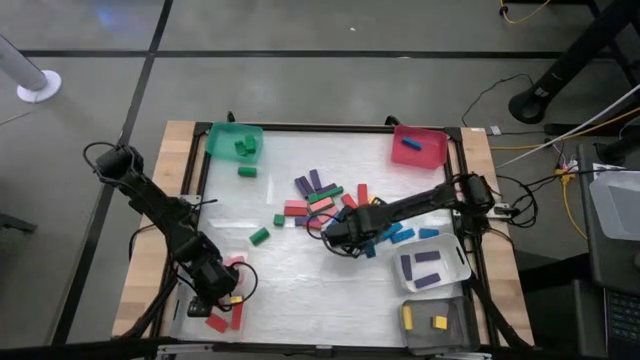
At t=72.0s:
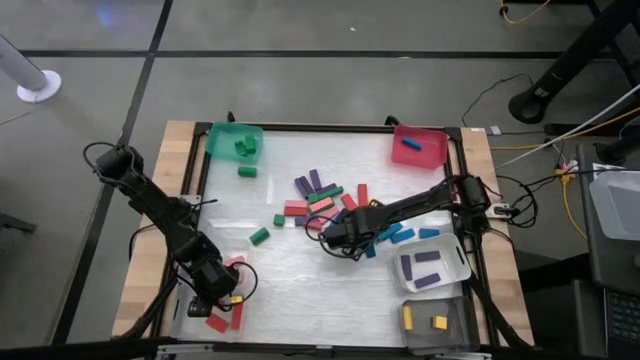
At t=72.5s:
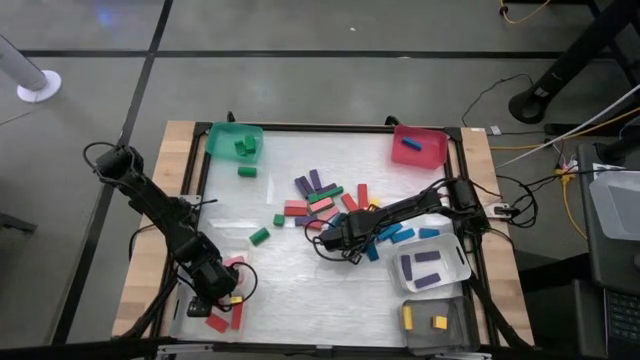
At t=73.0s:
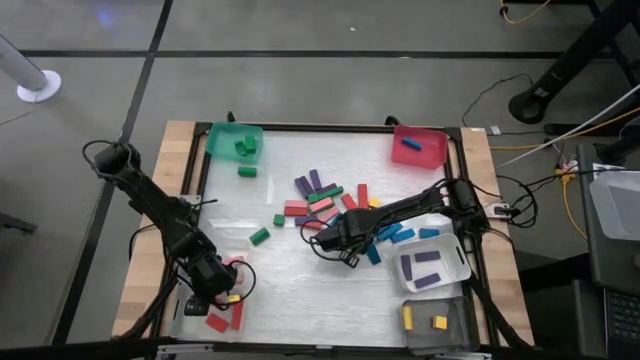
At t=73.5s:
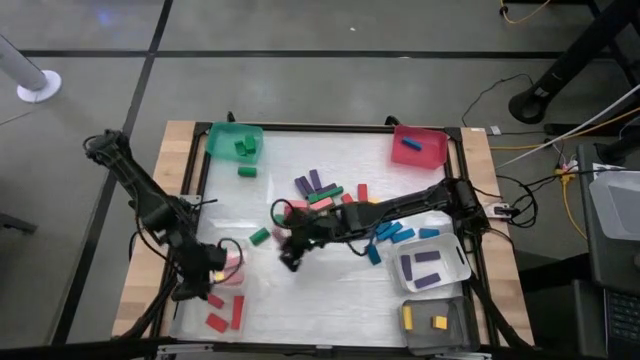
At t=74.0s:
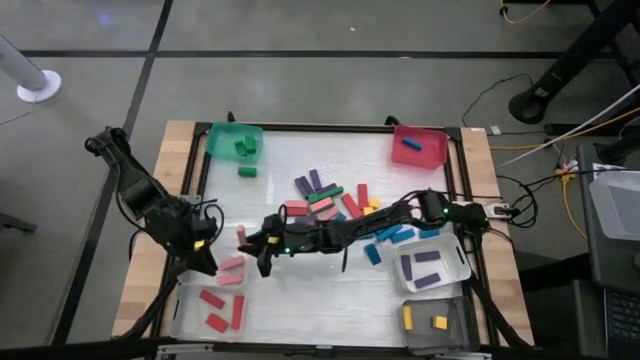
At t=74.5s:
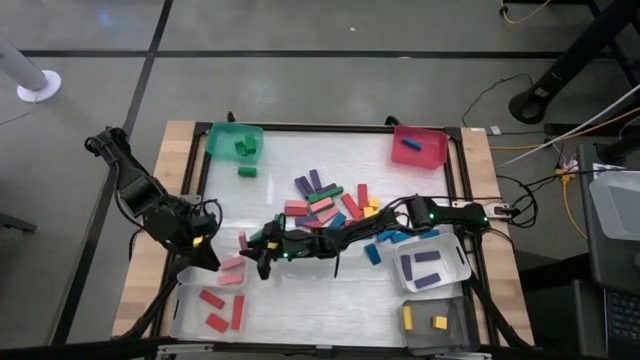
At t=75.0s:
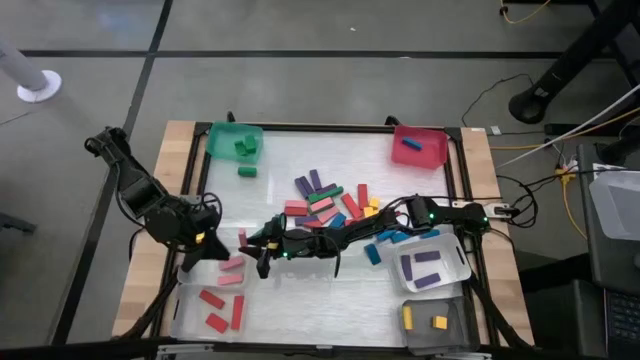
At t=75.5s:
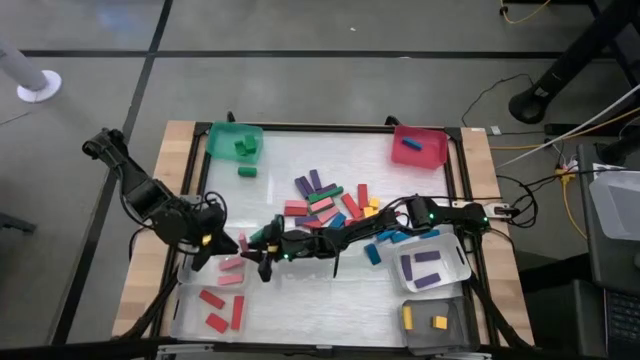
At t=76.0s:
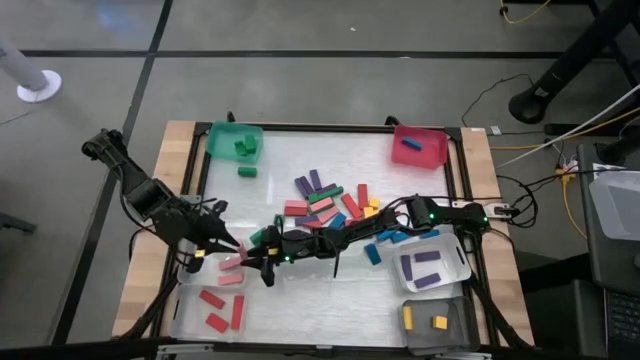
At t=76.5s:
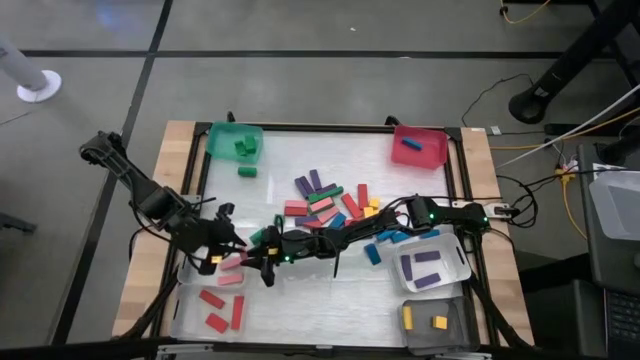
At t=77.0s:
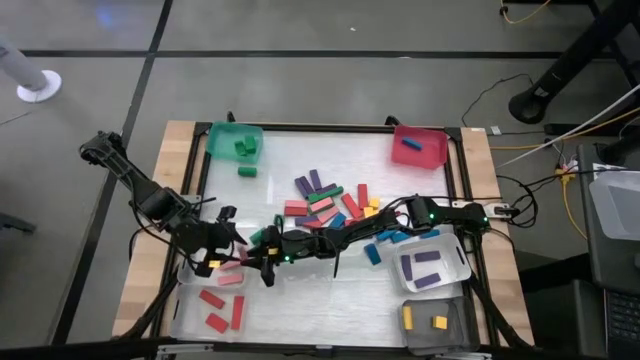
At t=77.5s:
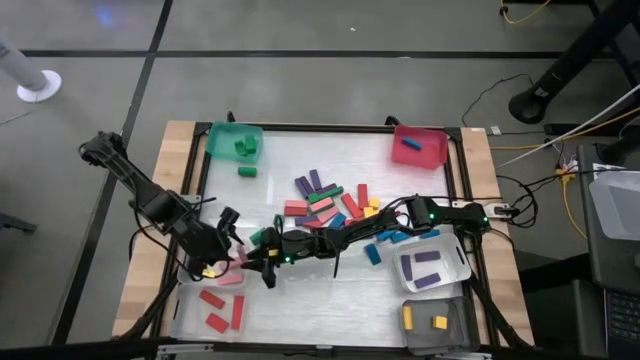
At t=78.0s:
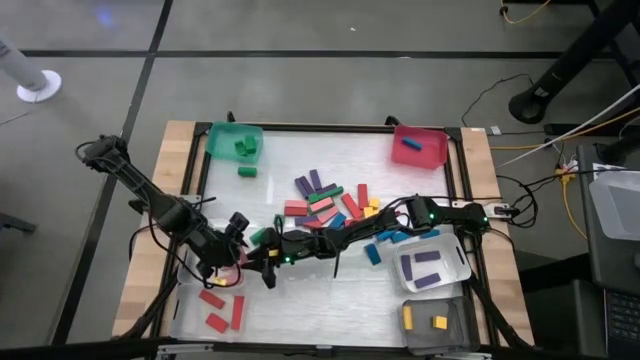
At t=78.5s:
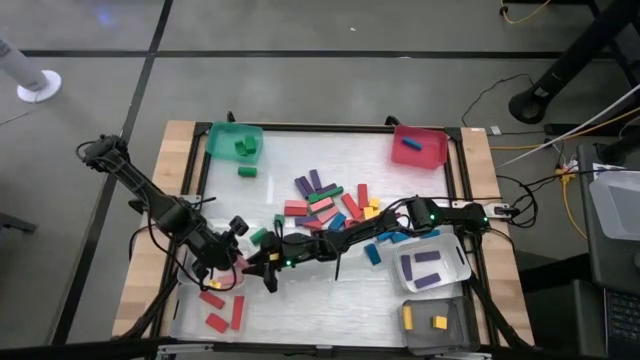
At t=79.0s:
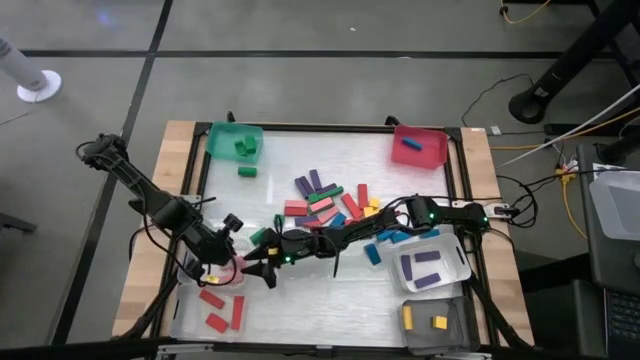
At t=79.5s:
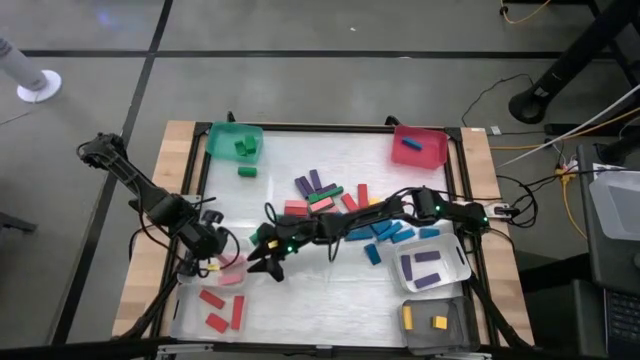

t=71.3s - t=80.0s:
Task: Sort blocks
Put the pink block into the top transparent bin

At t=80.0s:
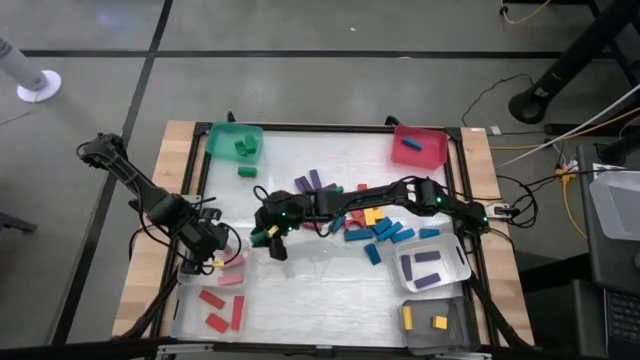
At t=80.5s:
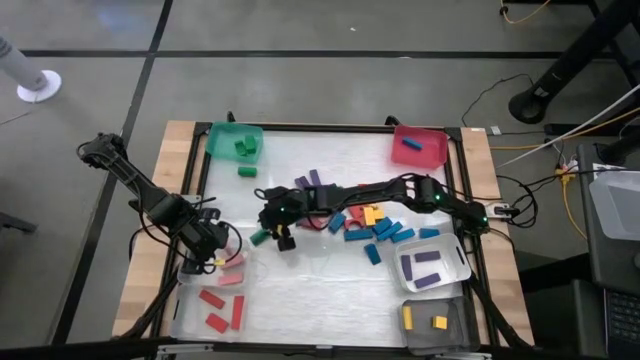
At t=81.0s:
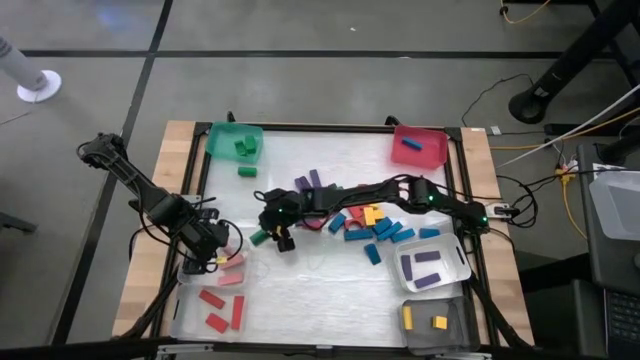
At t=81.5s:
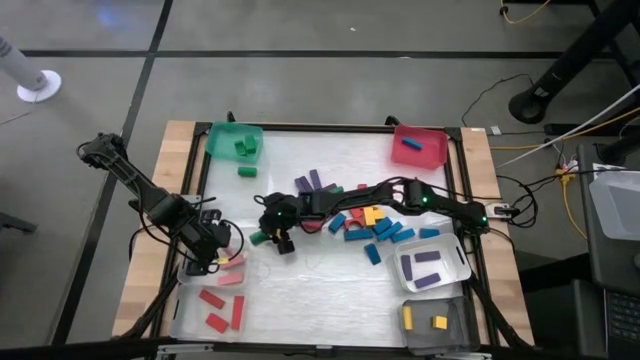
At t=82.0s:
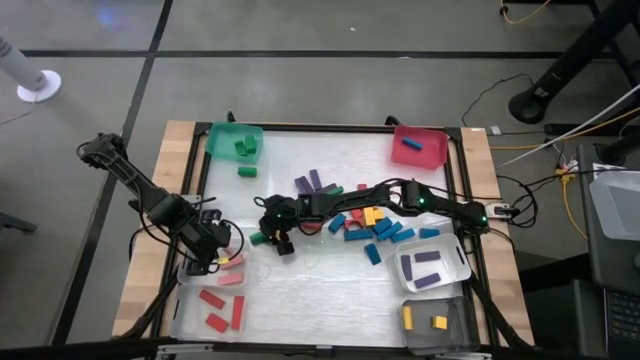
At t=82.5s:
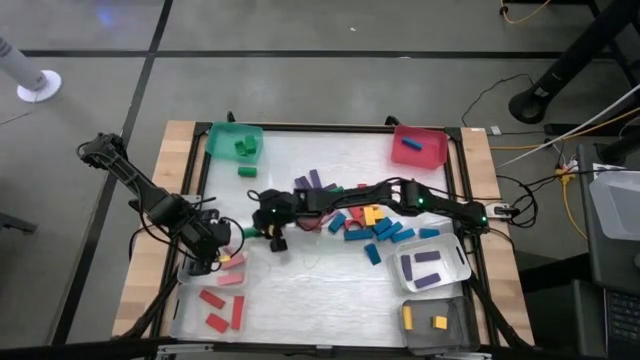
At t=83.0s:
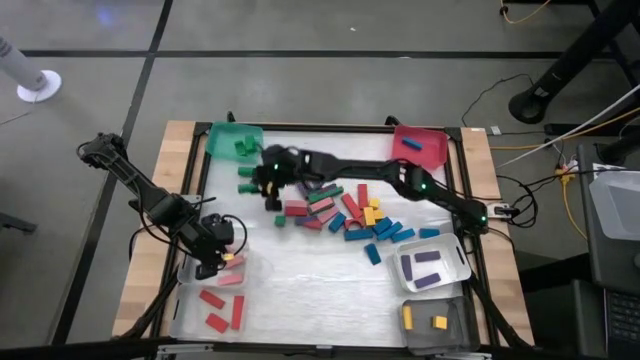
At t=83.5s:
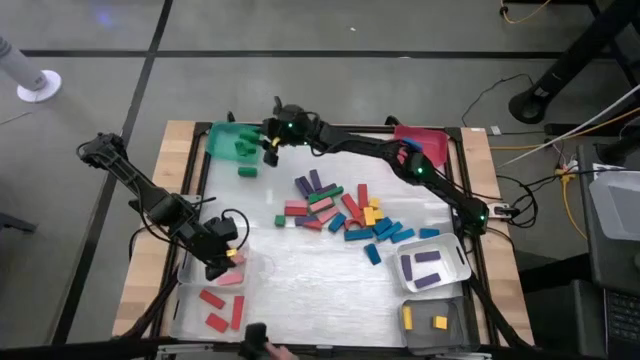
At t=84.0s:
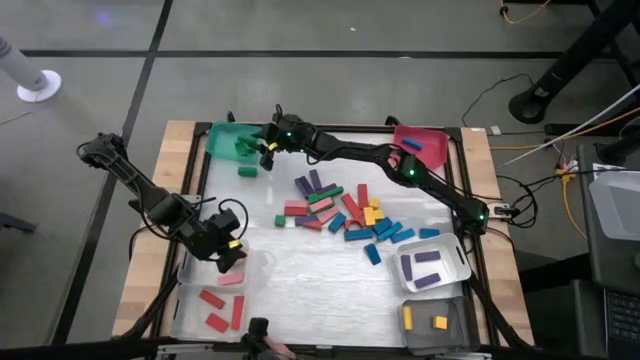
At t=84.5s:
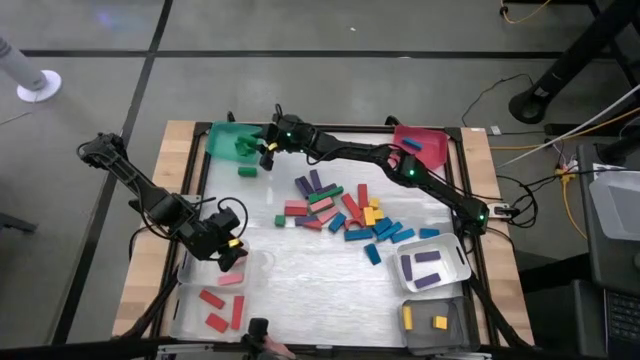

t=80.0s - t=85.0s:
Put the green block into the green bin

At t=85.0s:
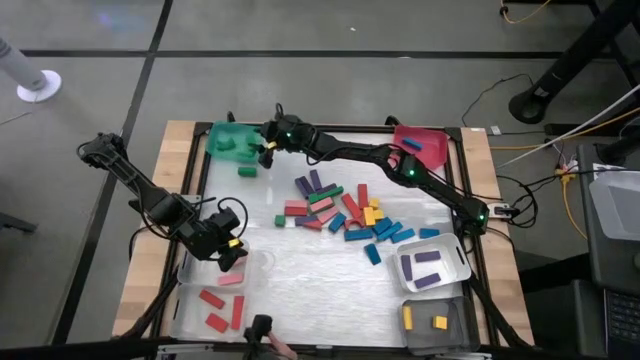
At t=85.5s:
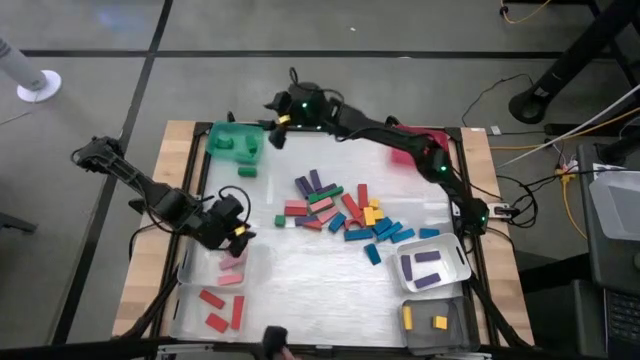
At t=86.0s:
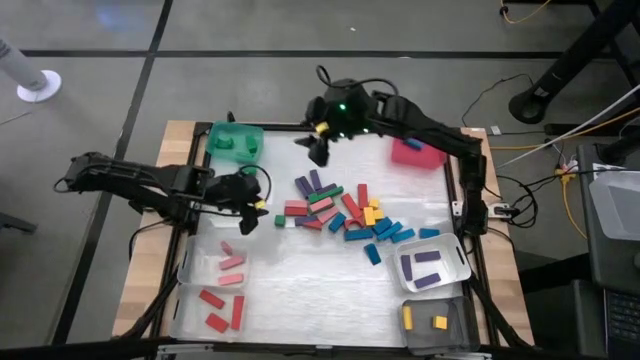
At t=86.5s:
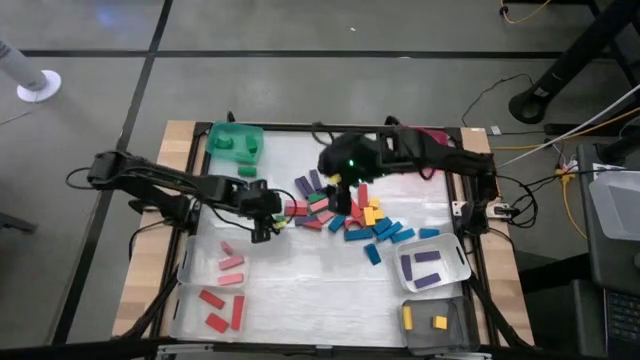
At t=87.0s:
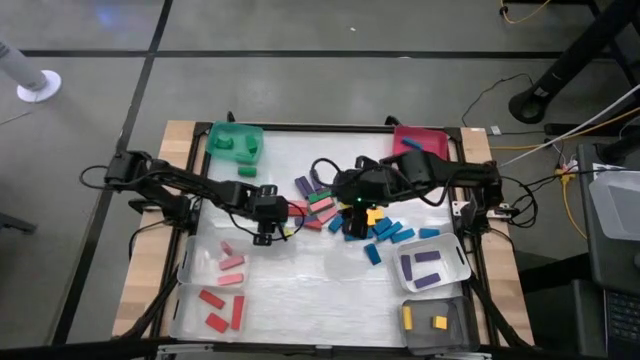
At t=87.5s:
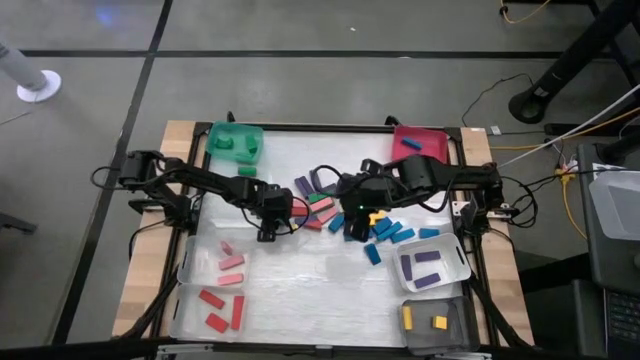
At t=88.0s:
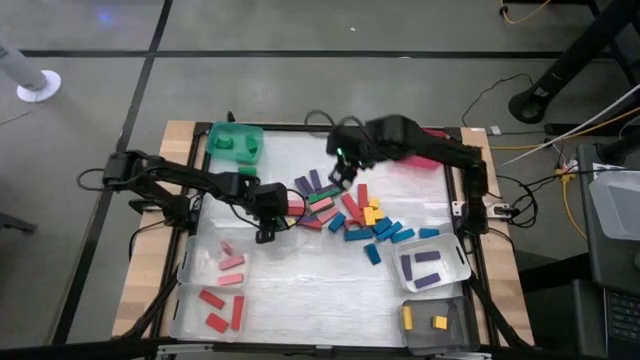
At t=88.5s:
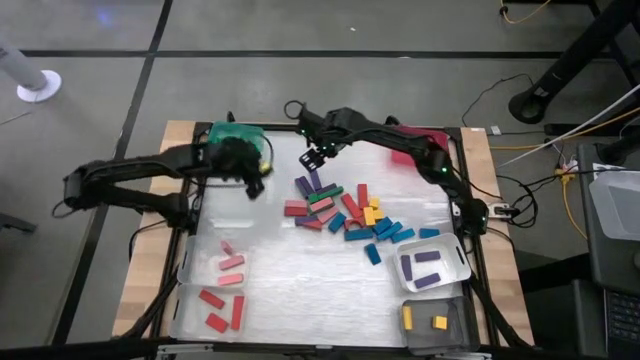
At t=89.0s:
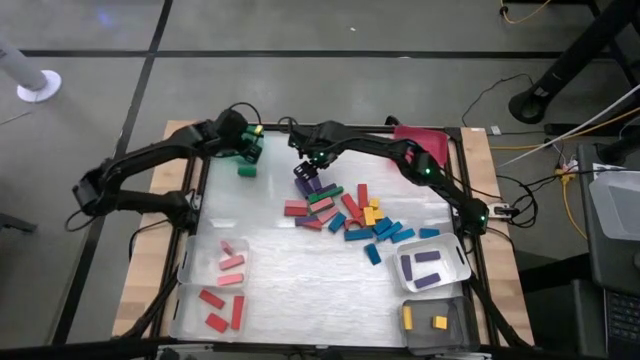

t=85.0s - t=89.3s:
Put the green block into the green bin

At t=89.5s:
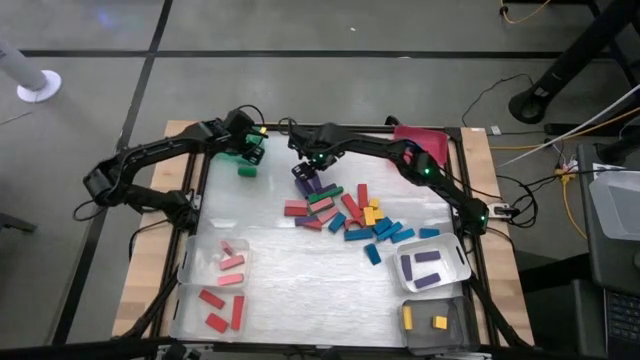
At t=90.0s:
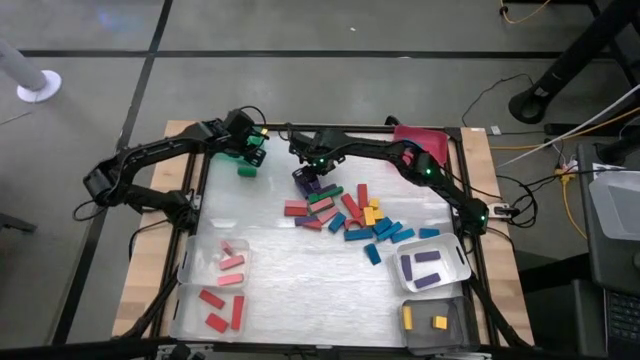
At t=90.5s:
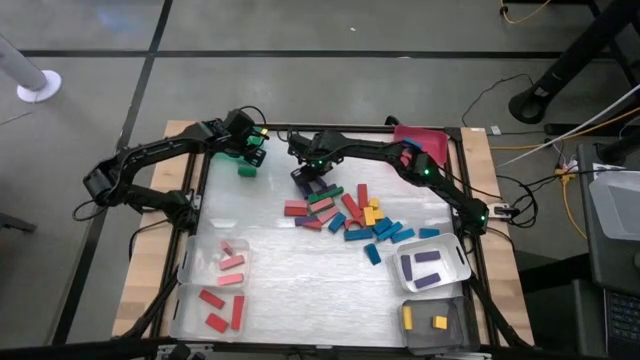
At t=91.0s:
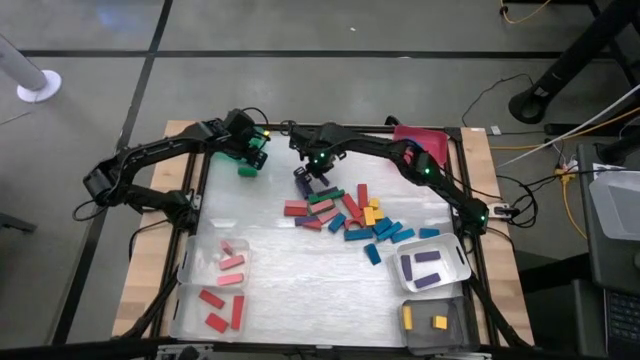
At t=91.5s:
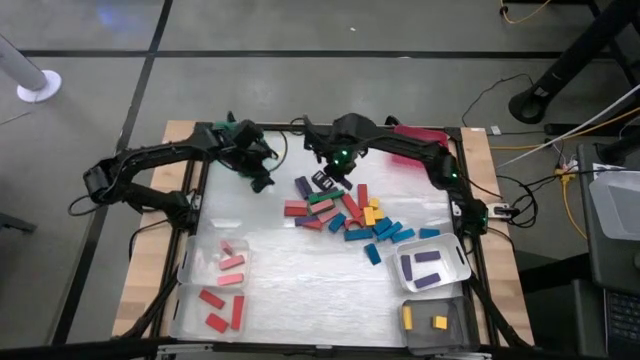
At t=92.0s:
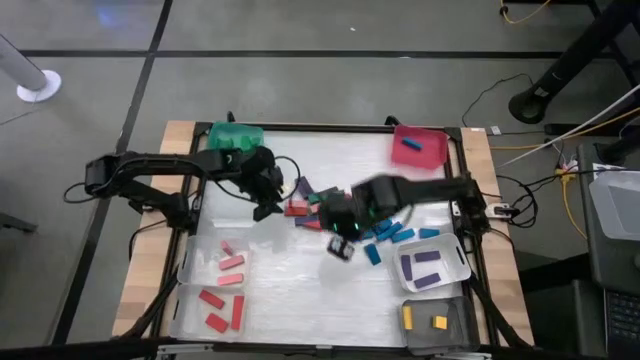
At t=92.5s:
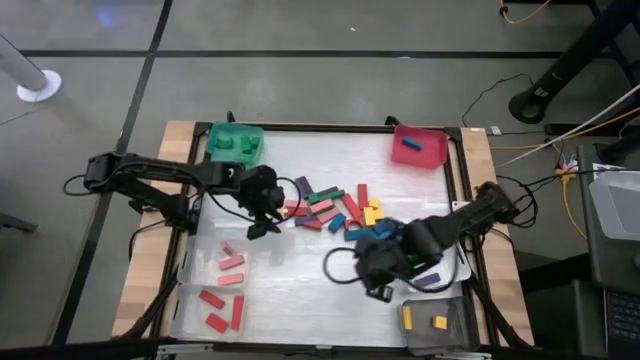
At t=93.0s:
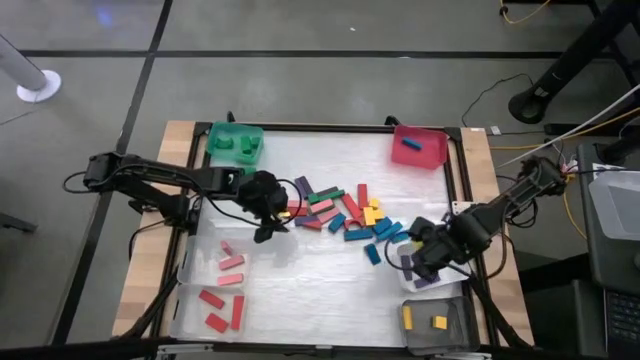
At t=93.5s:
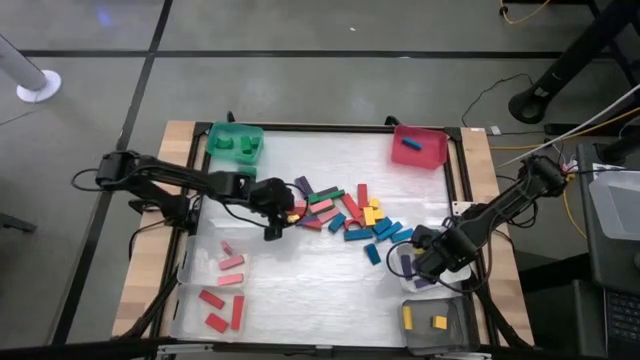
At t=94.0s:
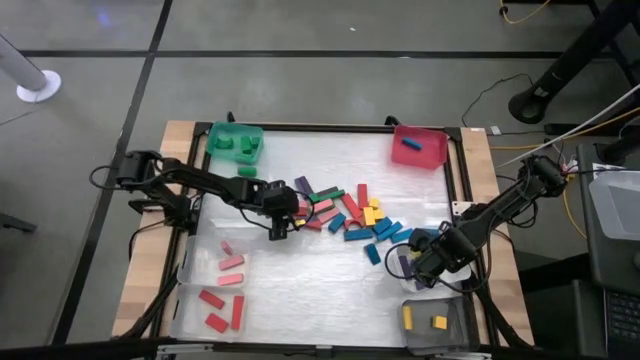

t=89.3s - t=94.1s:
Put the violet block into the white bin
